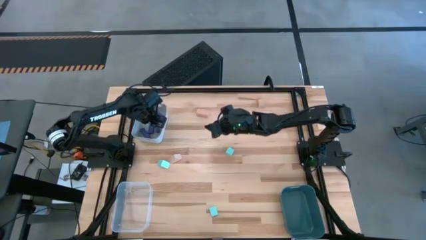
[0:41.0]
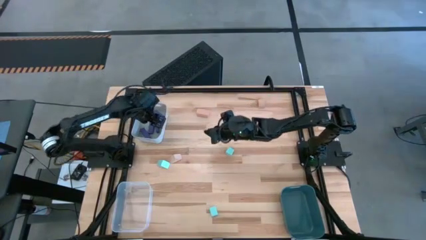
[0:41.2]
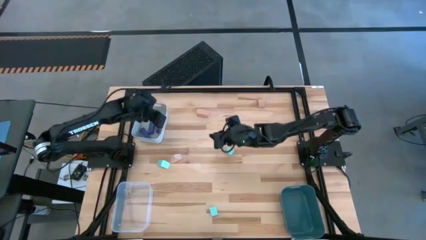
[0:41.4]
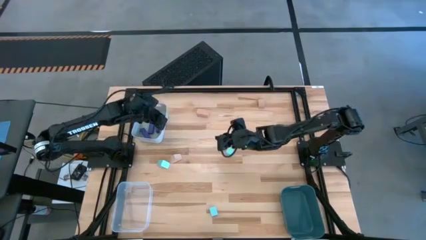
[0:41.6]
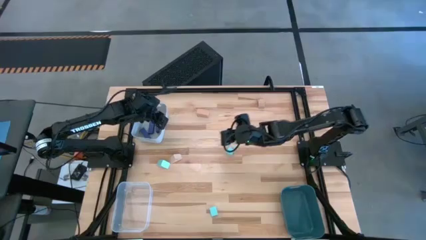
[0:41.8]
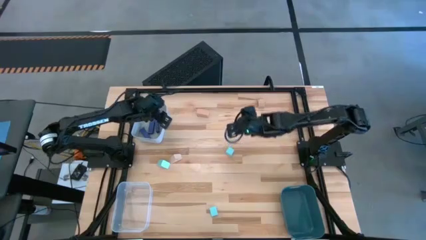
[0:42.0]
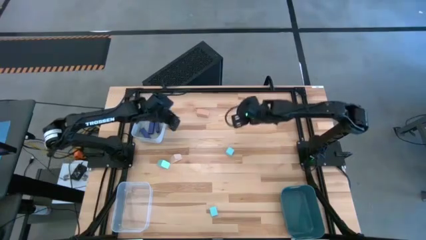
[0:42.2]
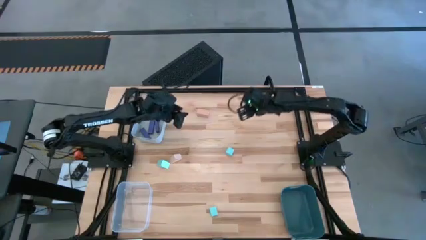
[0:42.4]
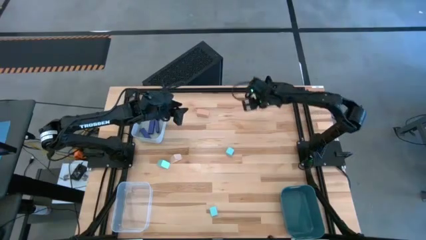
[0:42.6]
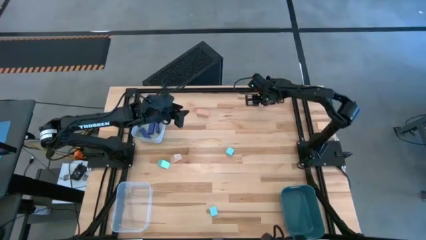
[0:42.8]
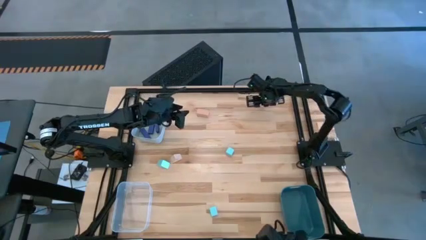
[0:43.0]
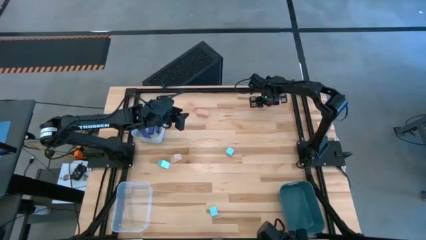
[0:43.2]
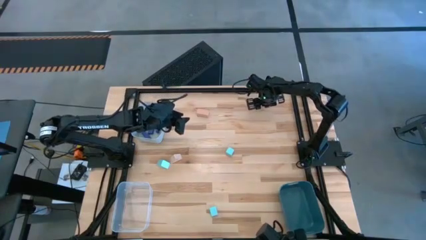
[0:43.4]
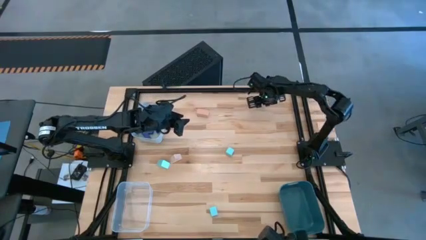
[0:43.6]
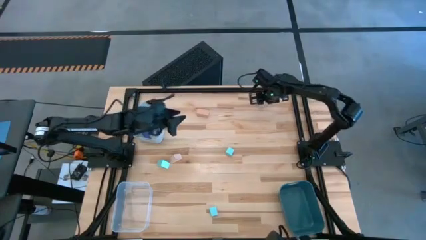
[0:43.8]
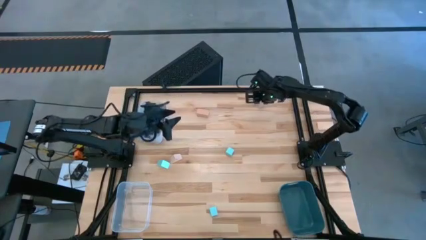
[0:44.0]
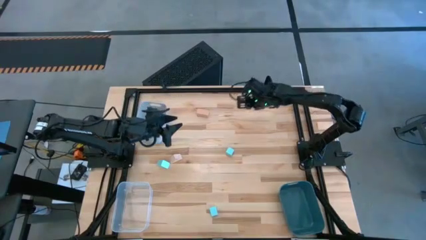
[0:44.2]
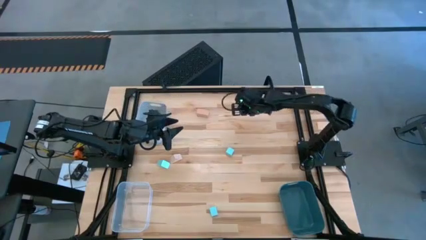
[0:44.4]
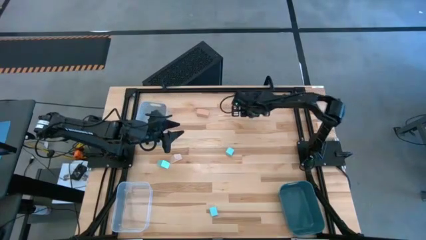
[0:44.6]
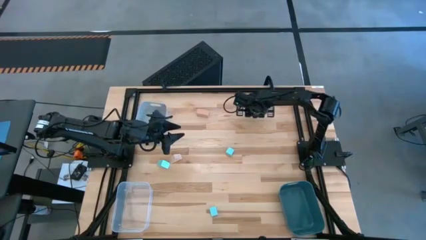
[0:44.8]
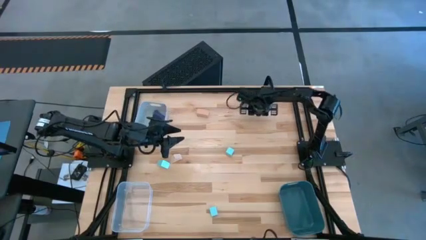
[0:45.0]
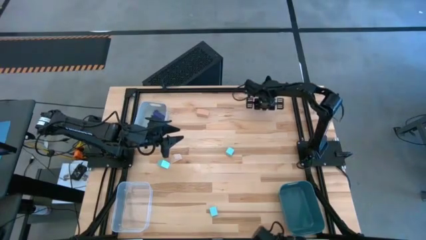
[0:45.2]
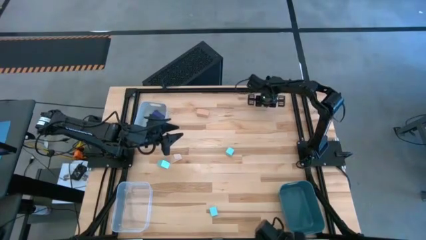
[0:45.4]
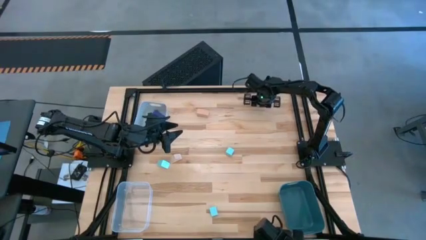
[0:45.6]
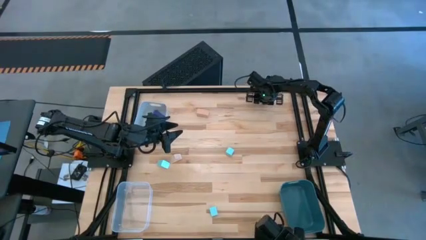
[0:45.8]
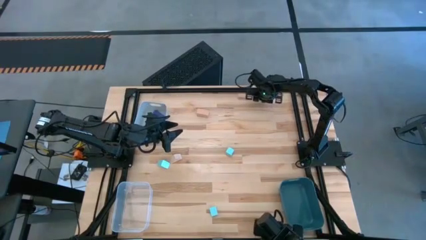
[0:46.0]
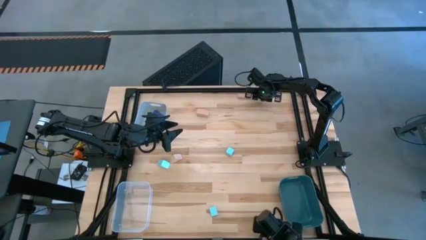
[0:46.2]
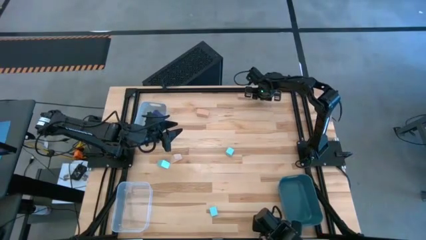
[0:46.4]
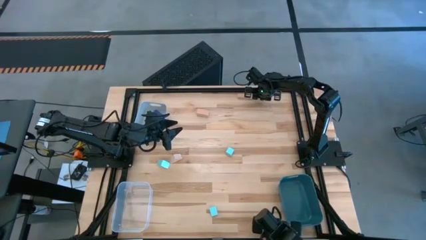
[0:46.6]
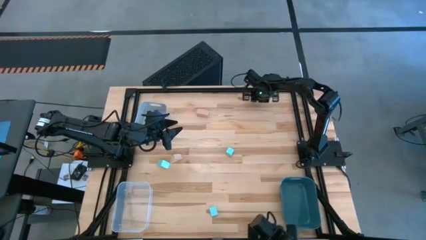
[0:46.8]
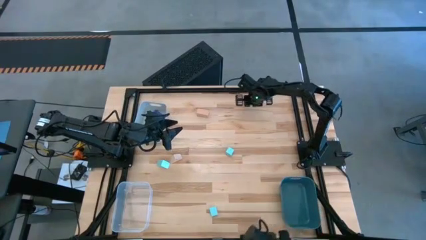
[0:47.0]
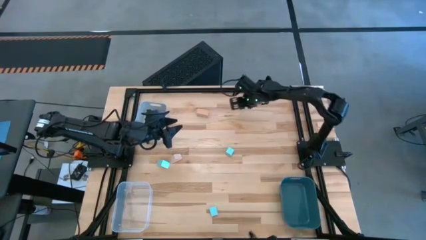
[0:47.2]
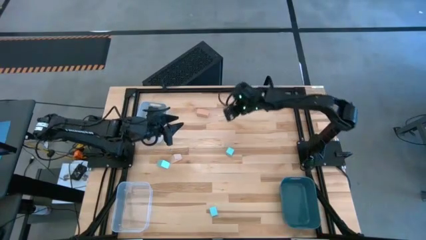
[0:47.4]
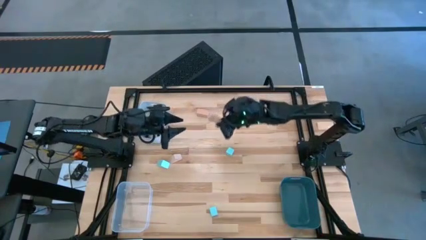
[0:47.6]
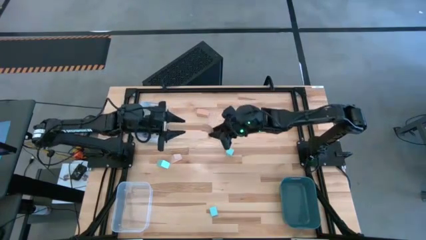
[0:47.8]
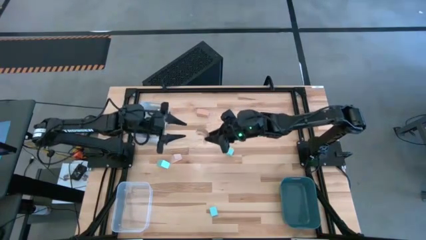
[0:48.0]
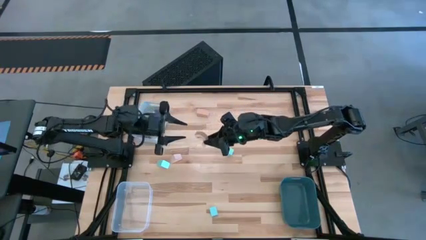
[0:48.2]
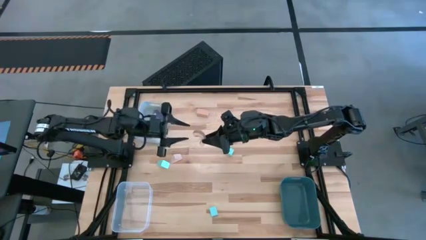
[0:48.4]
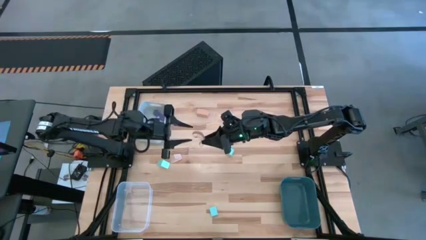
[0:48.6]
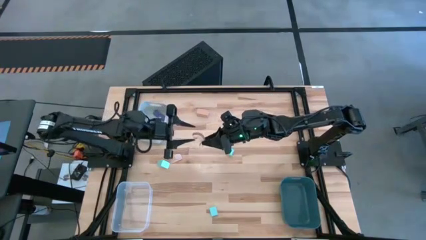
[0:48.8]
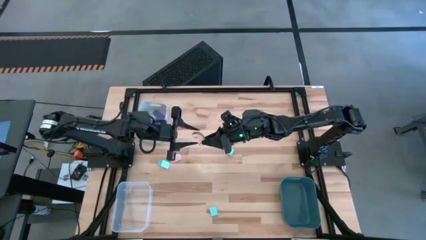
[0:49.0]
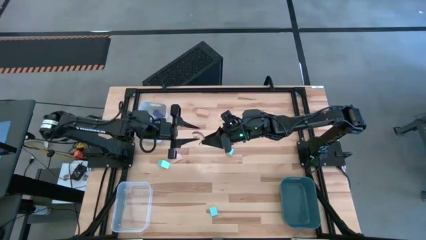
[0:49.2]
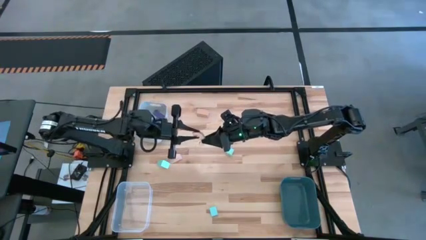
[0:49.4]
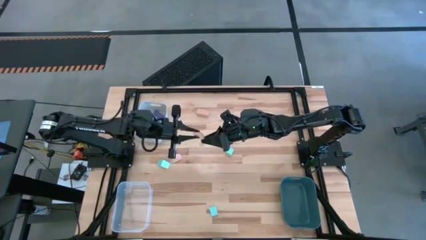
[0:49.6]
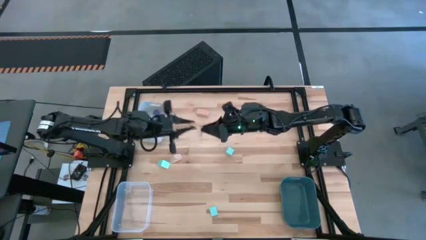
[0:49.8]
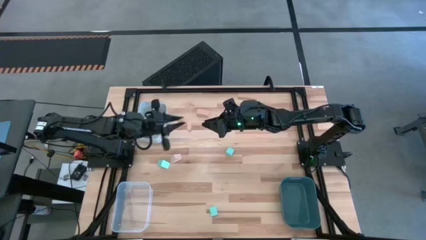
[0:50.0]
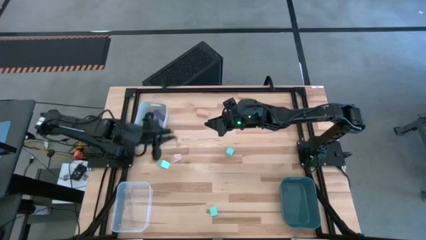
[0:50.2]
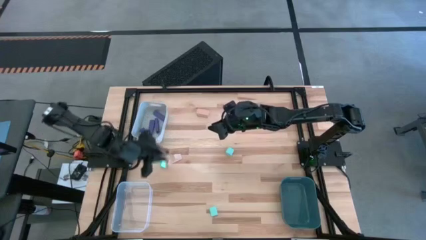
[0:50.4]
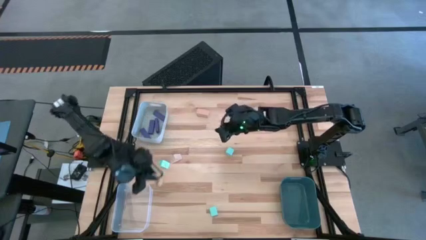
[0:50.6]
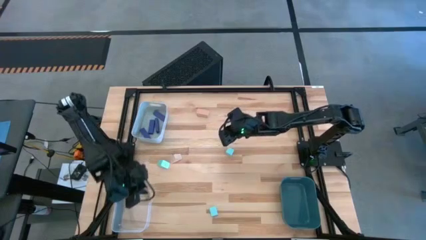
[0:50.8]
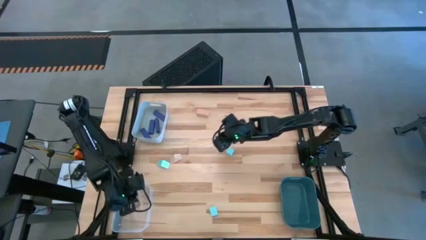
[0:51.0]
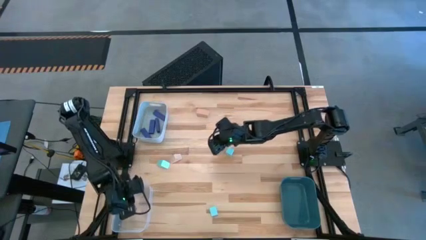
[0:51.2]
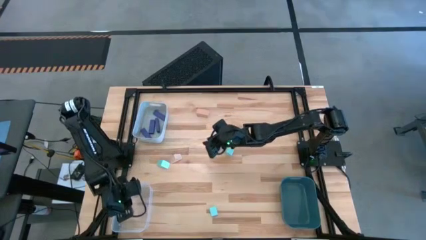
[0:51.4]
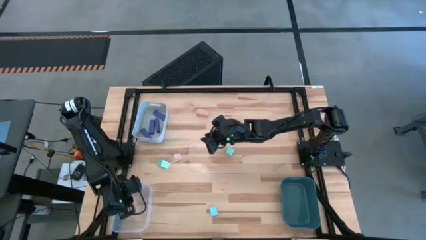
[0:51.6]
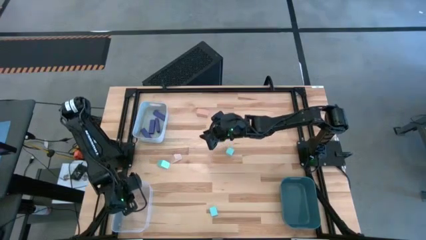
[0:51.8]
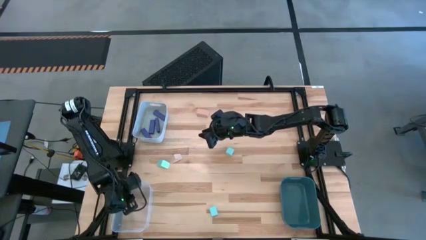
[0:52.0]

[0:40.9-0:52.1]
Task: Sort & place blocks by color
Put the brown block into the transparent bin

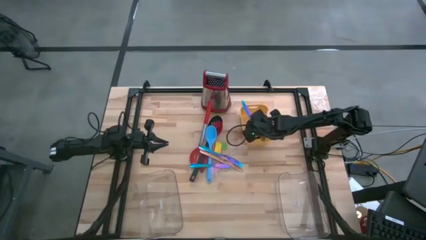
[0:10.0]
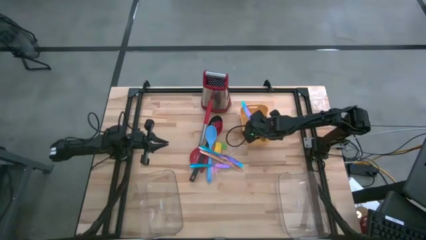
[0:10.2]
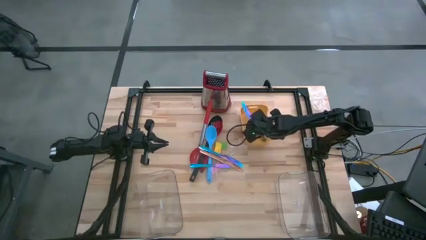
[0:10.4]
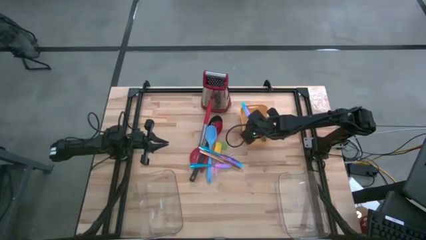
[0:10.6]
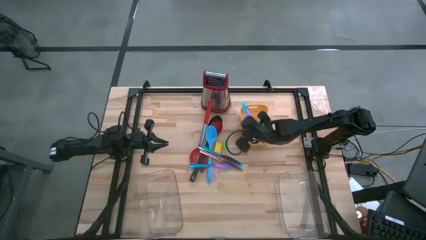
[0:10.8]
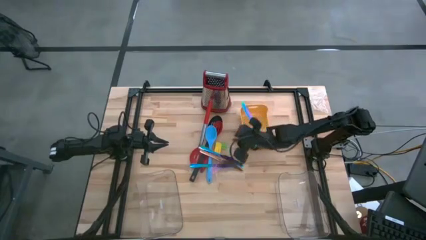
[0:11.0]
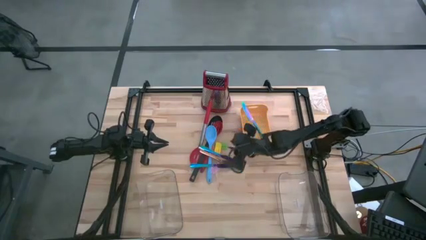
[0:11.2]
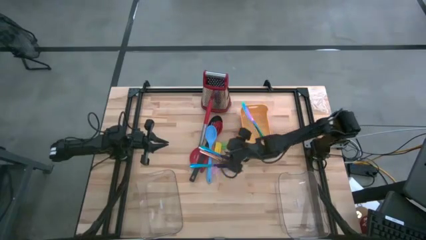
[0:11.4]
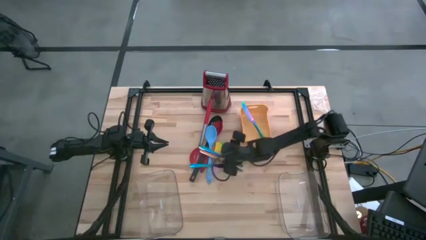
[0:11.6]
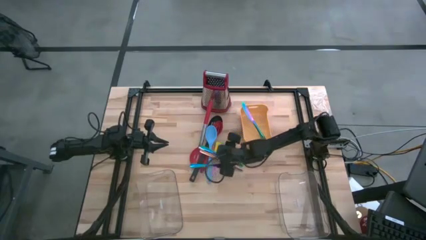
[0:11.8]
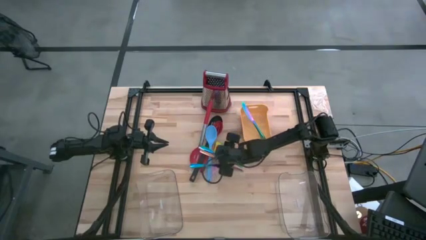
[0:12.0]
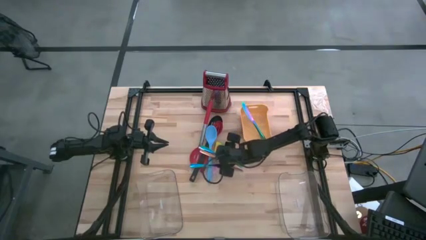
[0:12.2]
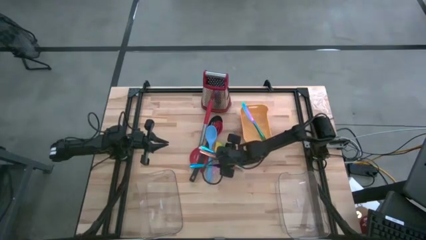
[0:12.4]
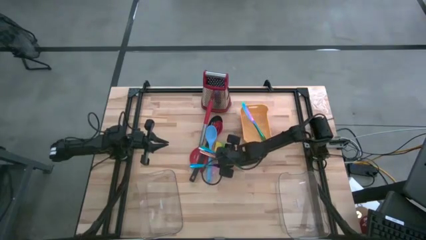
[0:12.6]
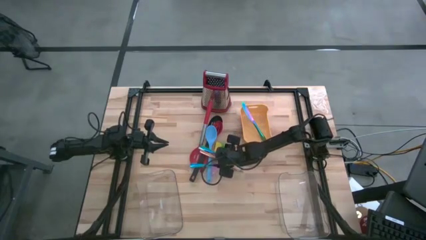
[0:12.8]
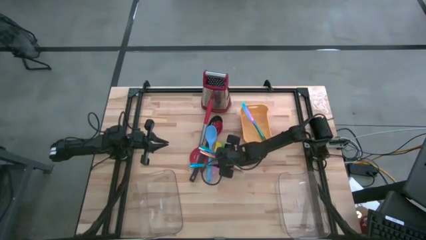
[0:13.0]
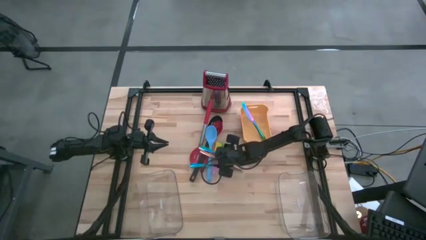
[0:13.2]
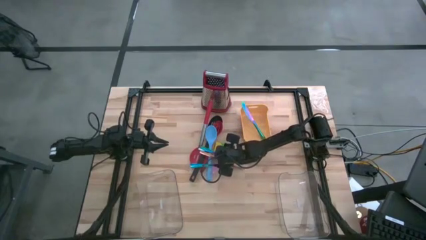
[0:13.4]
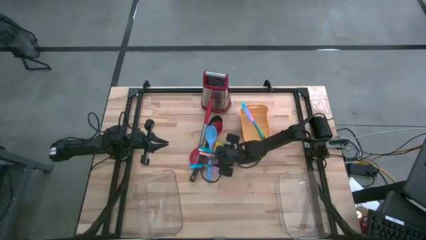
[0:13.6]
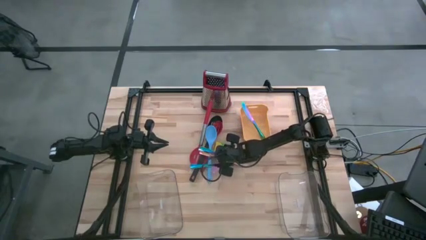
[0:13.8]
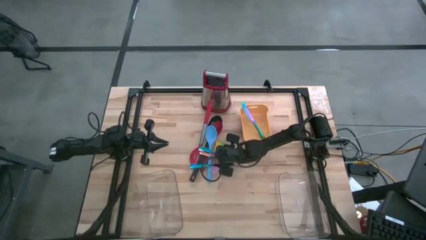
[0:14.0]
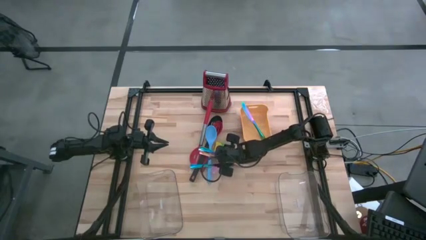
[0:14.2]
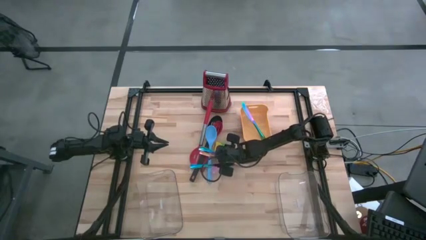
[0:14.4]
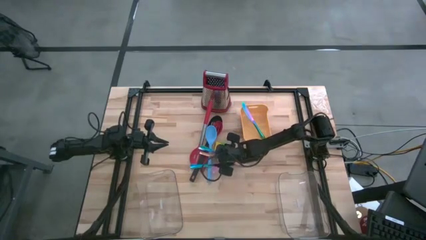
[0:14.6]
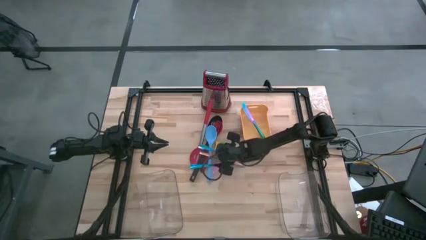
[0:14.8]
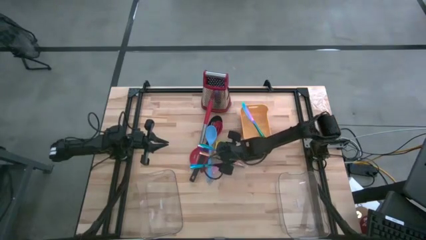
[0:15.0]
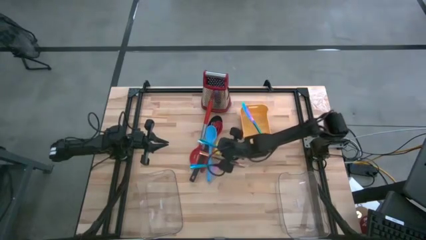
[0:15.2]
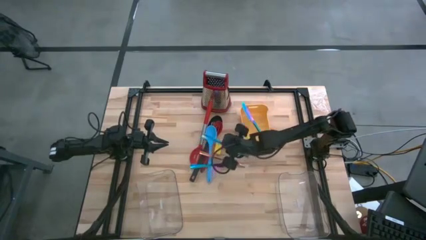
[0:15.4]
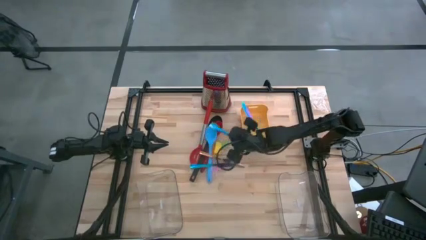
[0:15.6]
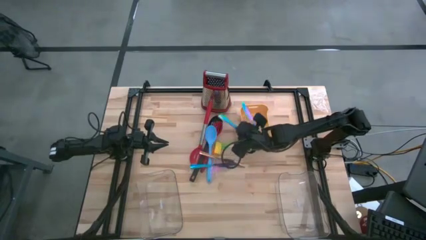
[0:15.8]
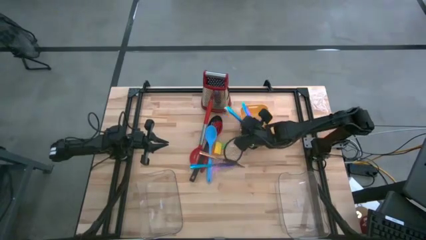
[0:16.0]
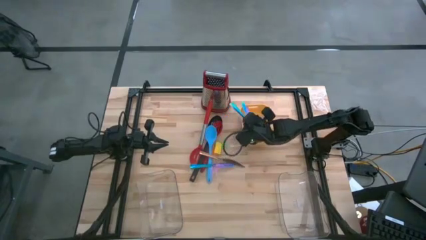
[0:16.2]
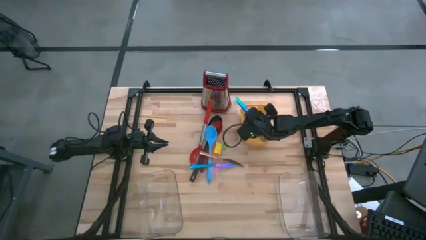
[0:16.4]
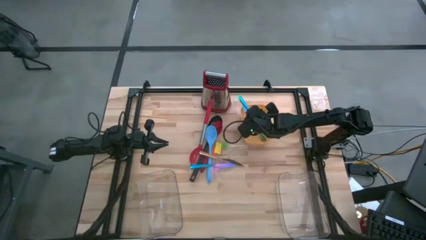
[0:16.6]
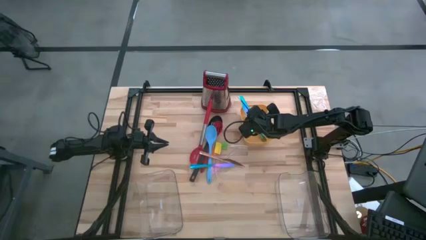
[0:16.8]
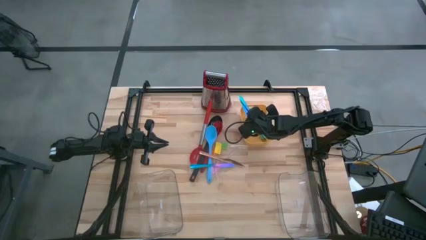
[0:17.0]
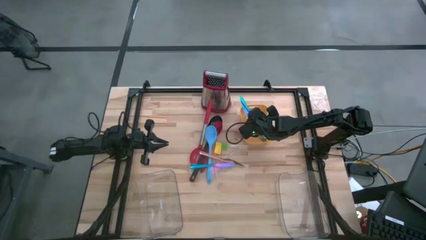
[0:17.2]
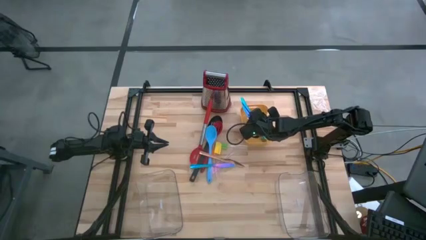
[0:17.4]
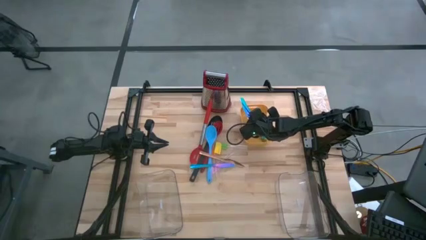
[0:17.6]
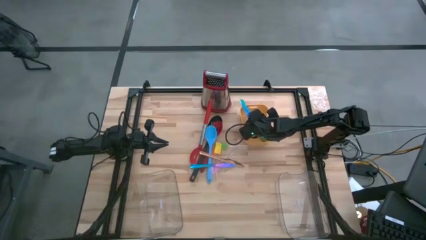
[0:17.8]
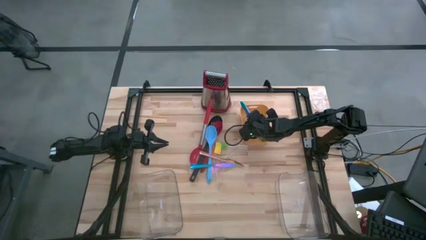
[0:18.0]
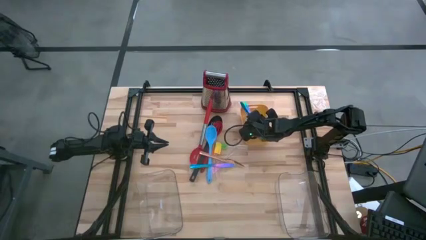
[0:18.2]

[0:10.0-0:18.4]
Task: Pick & Place Kitchen Items
Put the blue table knife into the yellow bin
